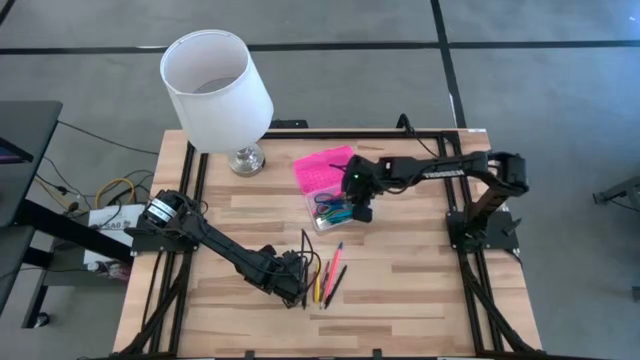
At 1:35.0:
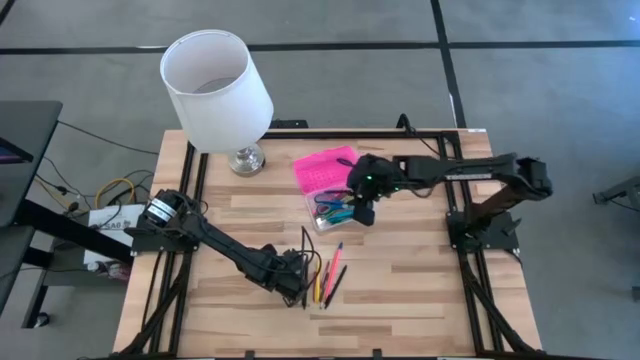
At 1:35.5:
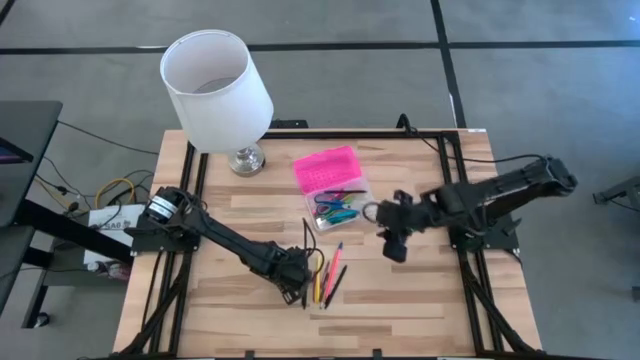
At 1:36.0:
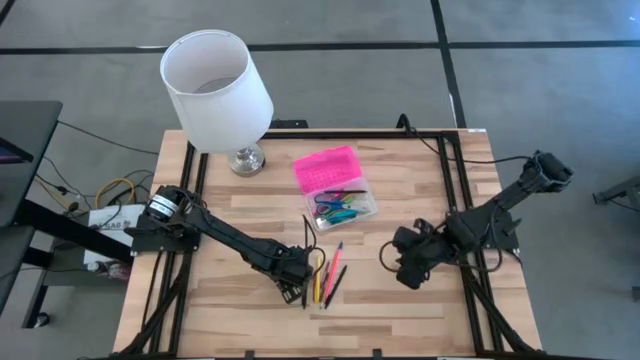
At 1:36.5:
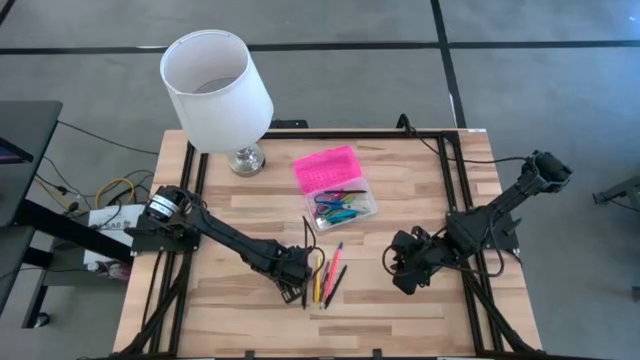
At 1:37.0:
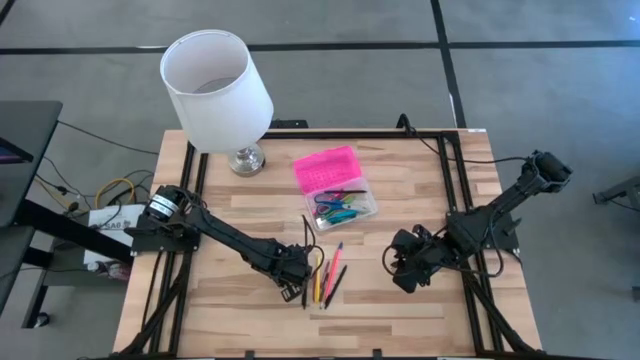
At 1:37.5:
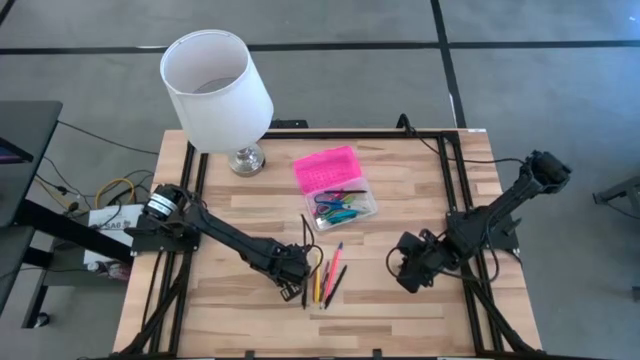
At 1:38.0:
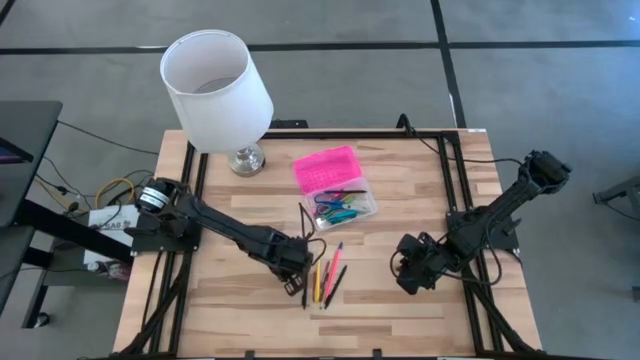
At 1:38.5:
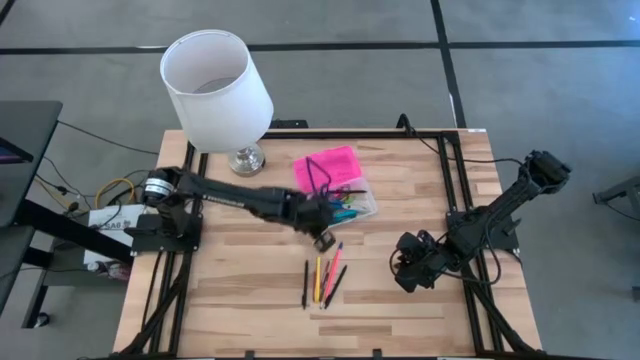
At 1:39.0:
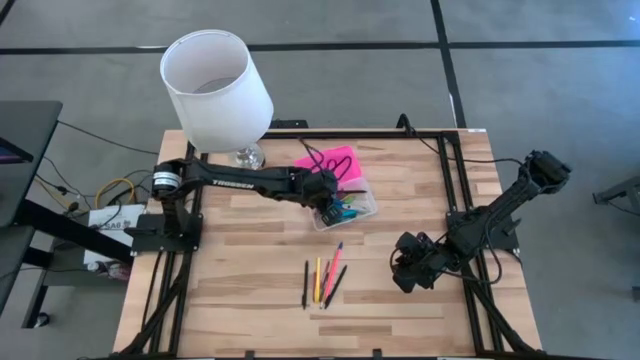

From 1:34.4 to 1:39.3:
Task: Pick & place school supplies into a supply box
Put the left green crayon into the pink supply box

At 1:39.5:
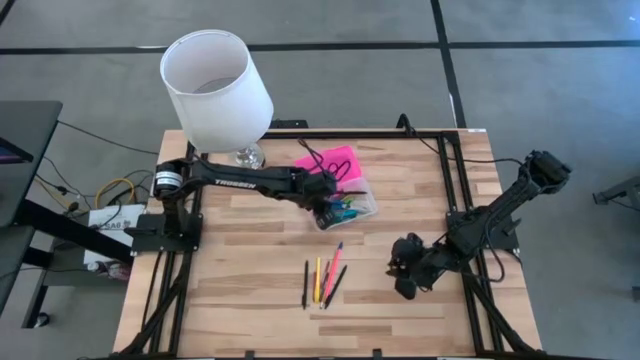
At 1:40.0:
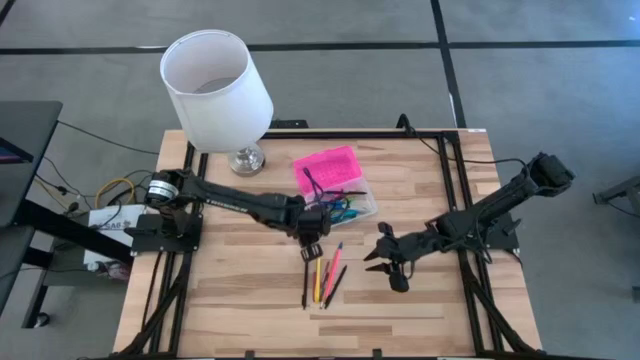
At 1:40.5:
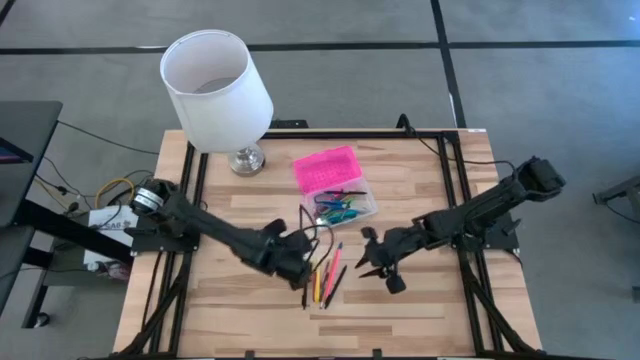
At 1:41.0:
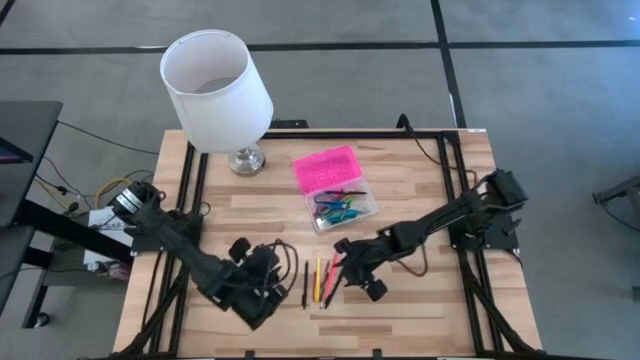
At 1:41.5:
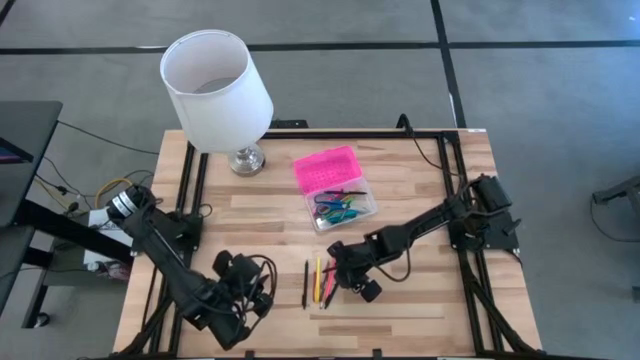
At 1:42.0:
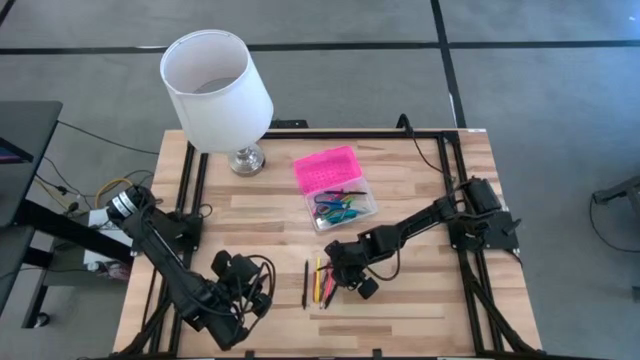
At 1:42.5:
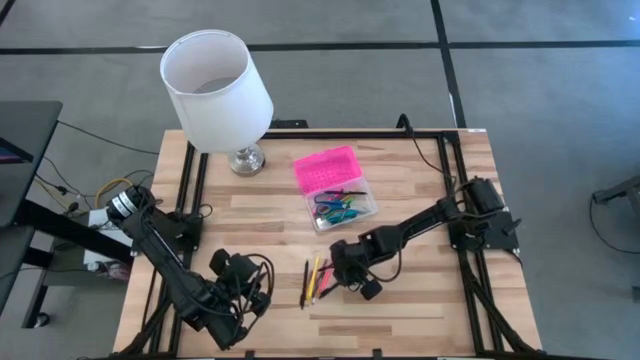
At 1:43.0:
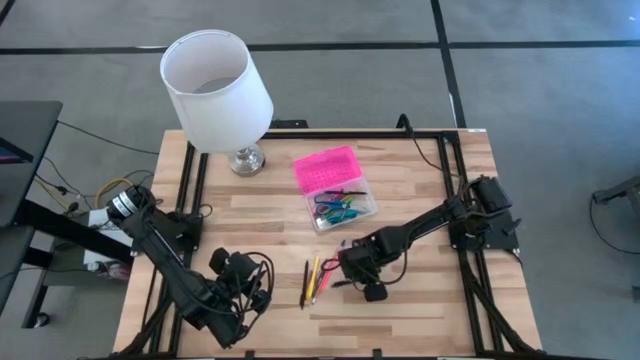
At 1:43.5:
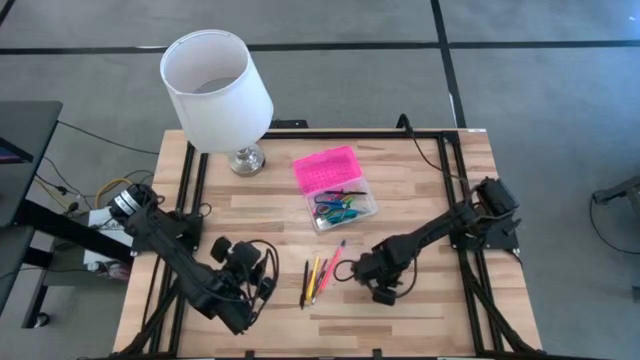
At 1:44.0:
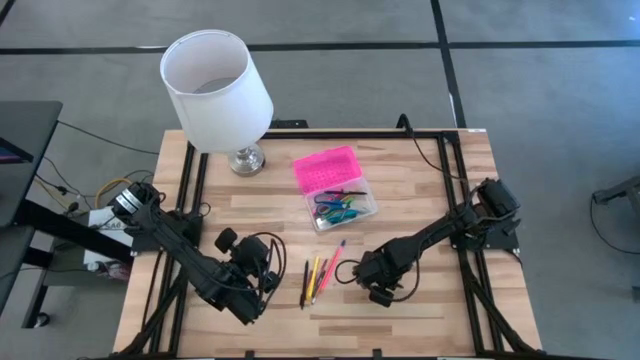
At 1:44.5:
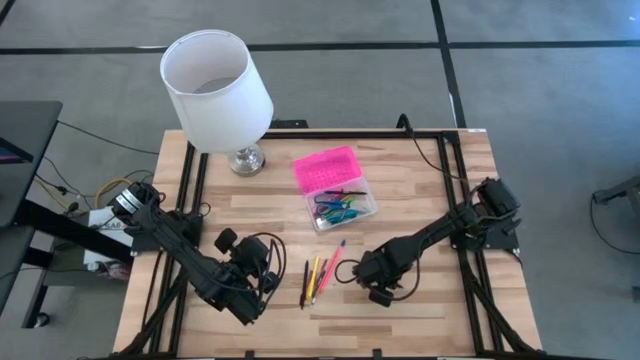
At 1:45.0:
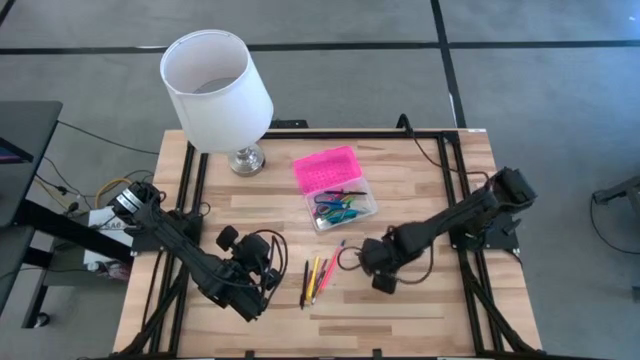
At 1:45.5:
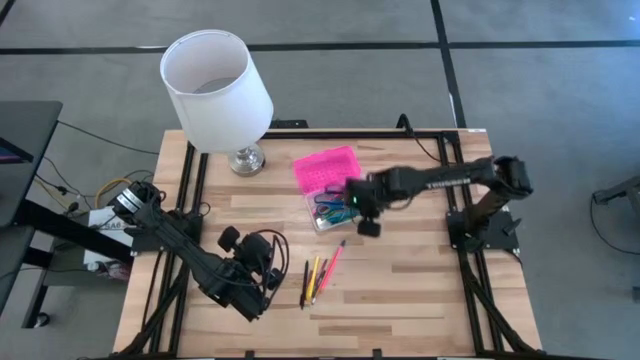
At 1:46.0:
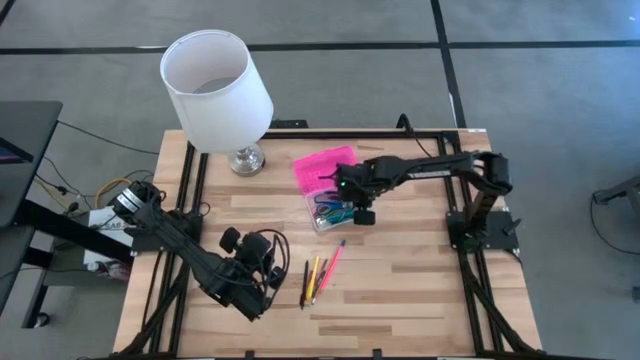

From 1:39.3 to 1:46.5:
Put the right black pen into the pink supply box

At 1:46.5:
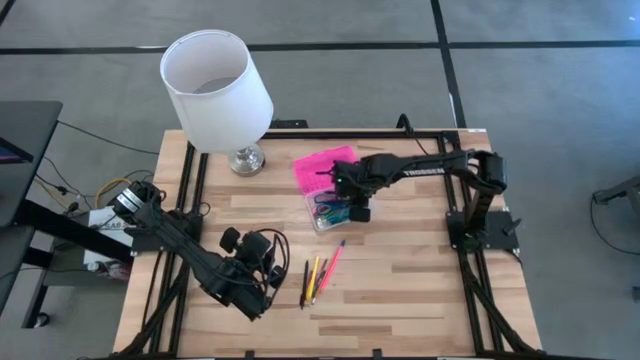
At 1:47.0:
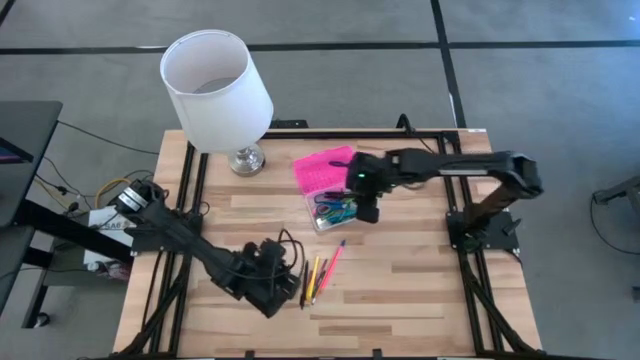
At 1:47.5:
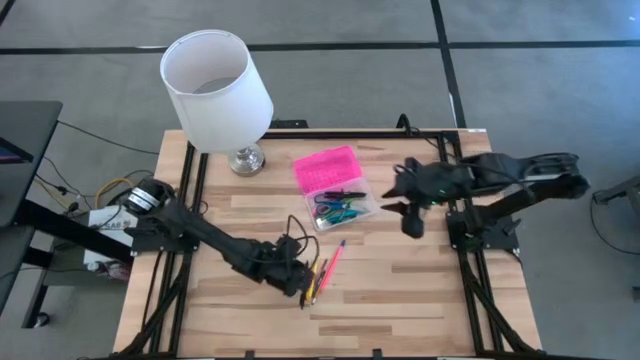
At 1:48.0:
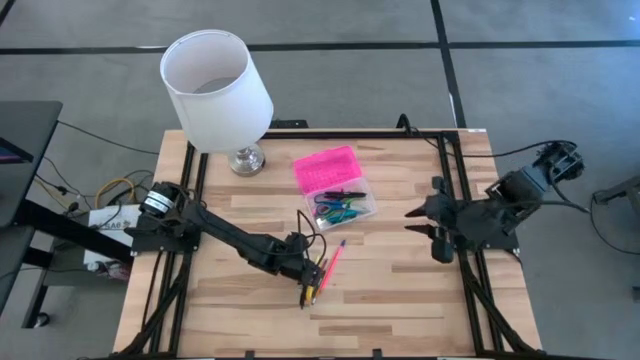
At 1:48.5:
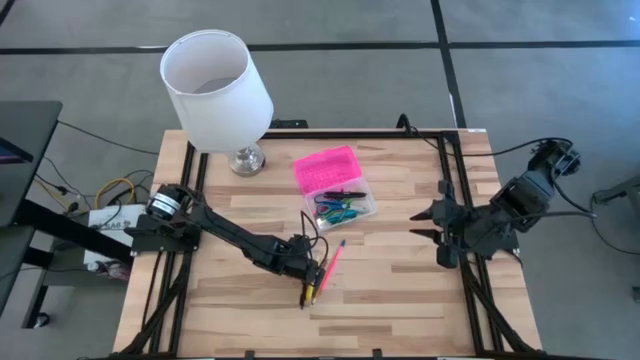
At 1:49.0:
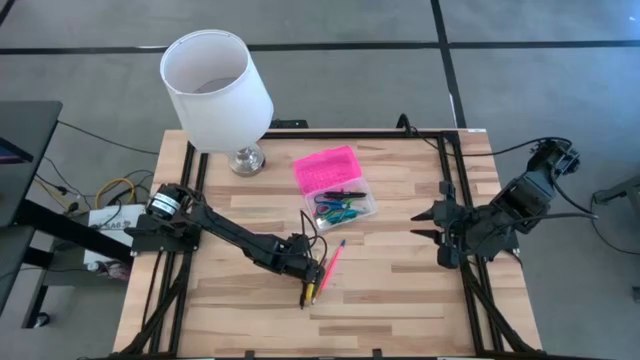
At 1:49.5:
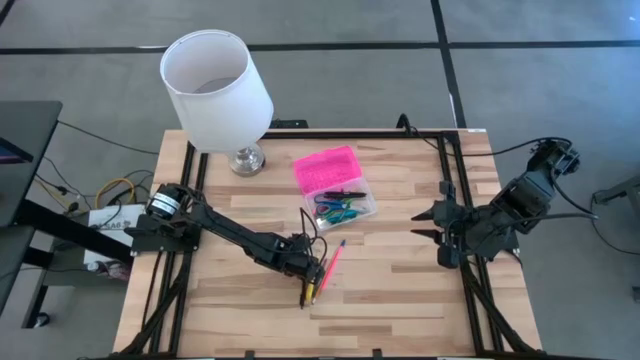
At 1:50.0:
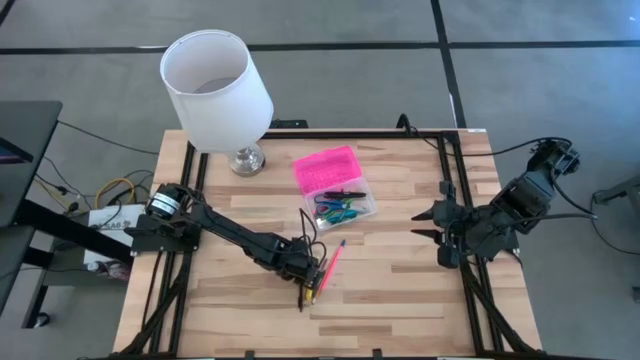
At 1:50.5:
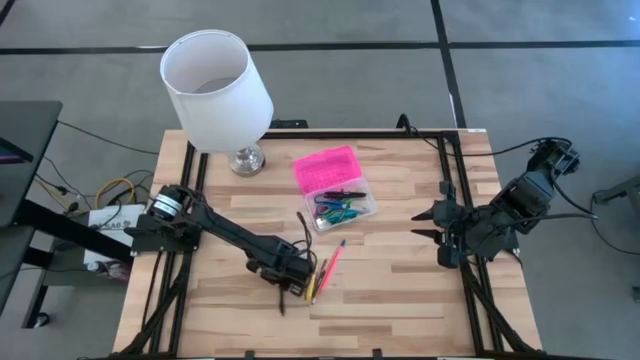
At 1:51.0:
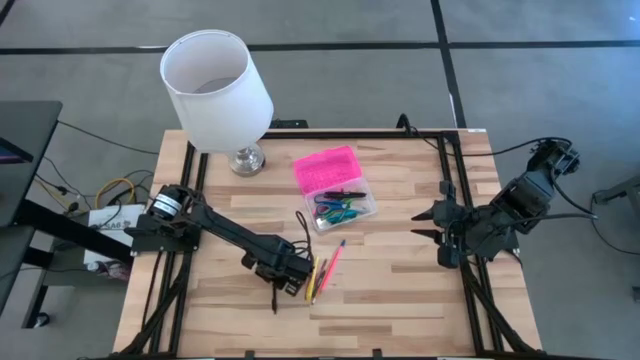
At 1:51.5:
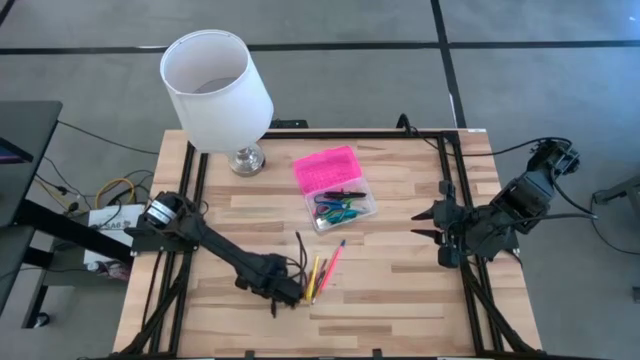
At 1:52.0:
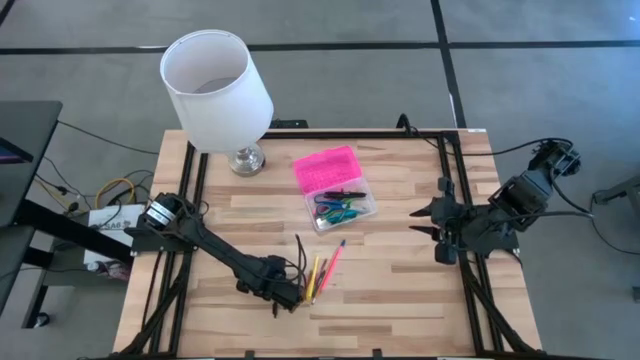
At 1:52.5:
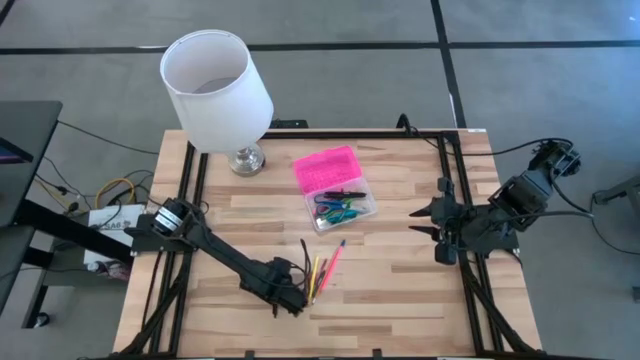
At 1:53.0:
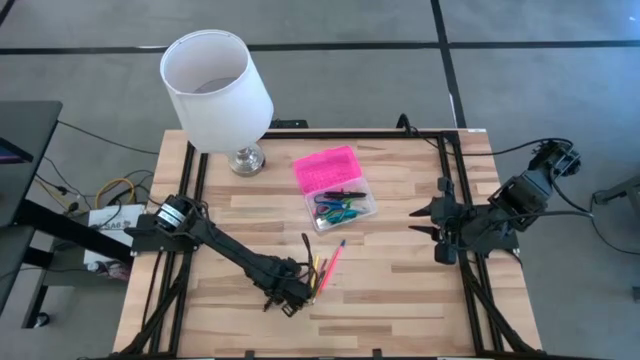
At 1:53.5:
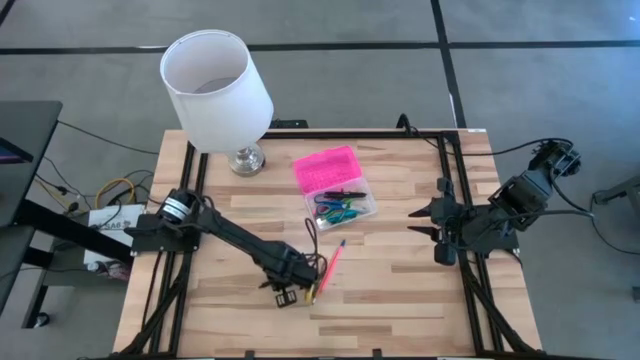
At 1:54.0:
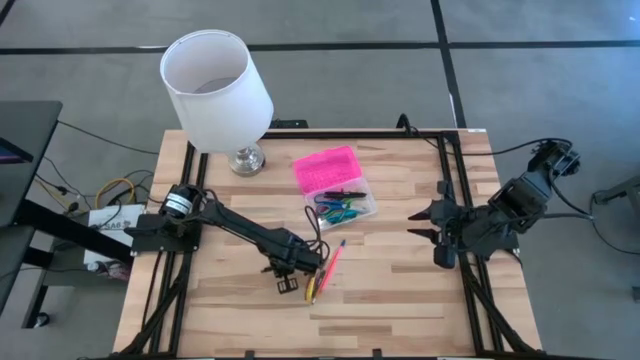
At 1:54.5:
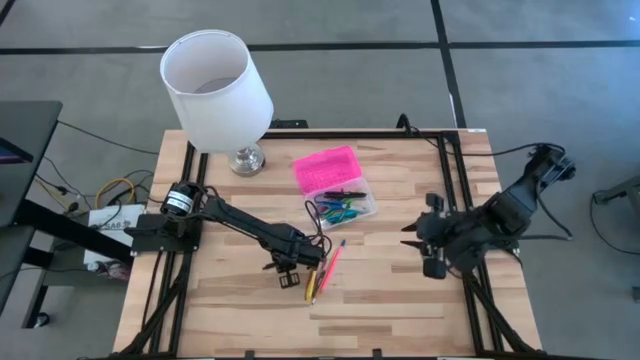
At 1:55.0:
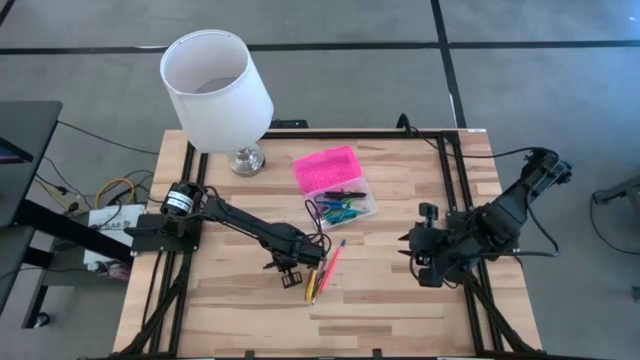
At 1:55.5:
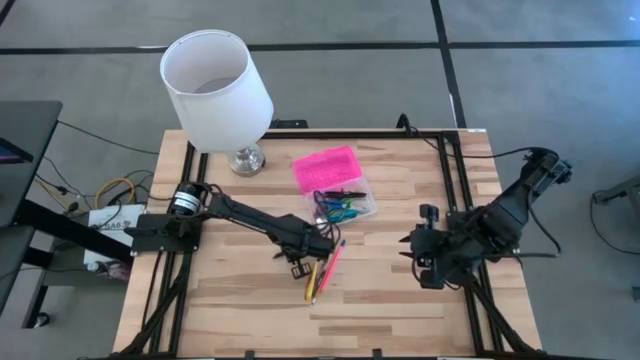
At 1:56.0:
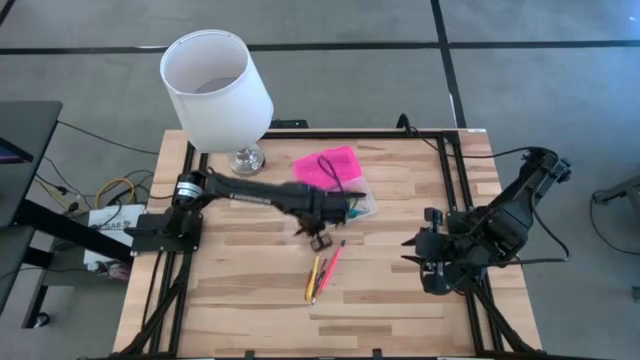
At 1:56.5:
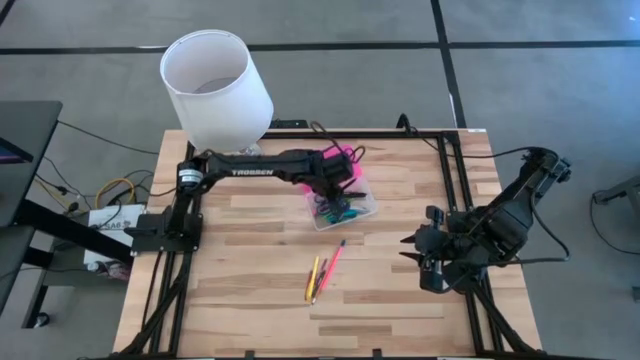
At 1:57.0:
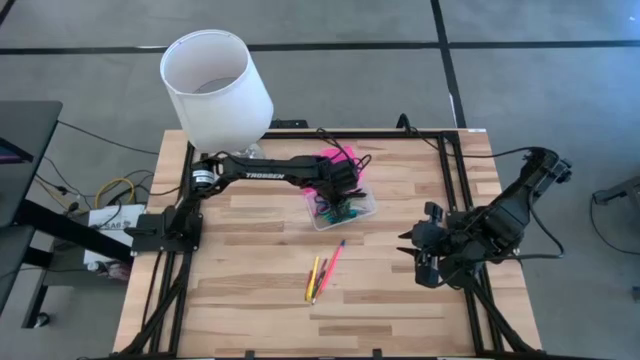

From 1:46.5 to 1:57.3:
Put the black pen into the pink supply box
